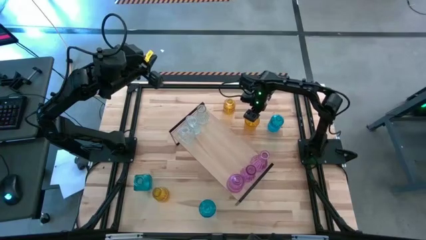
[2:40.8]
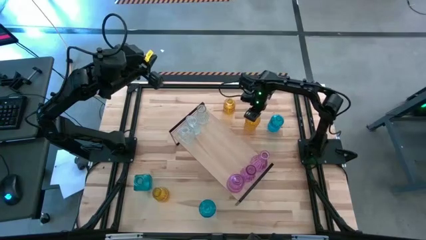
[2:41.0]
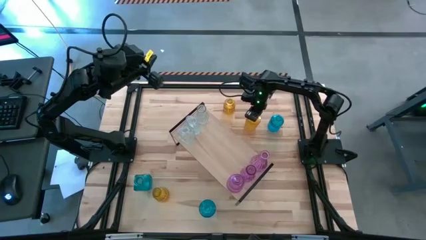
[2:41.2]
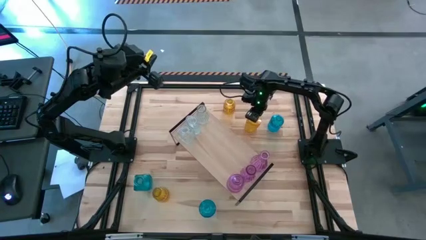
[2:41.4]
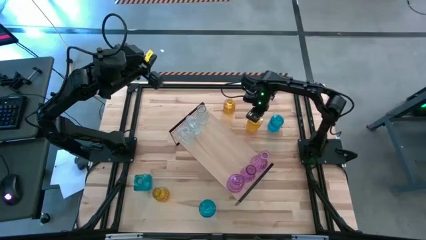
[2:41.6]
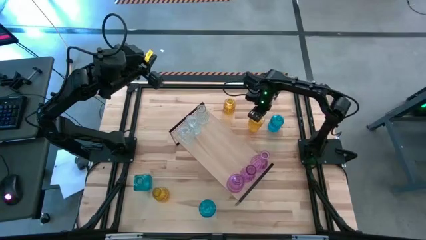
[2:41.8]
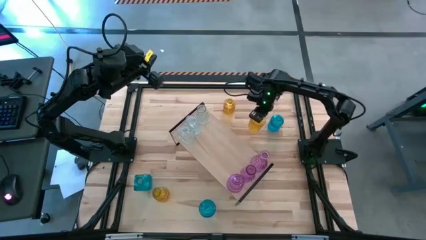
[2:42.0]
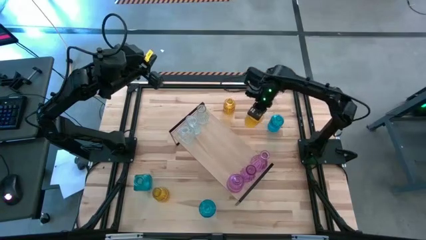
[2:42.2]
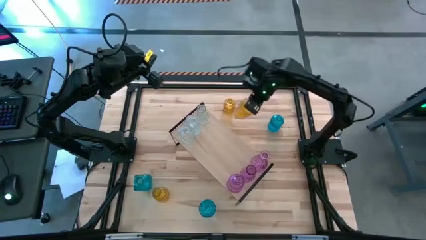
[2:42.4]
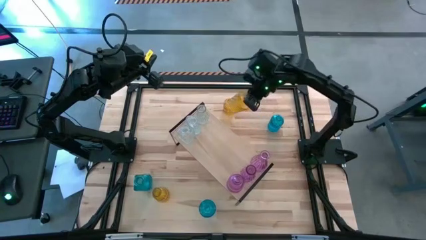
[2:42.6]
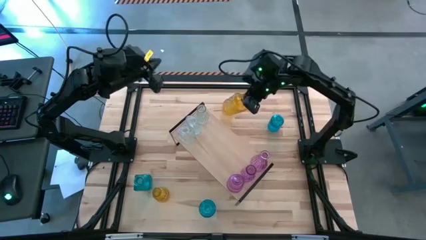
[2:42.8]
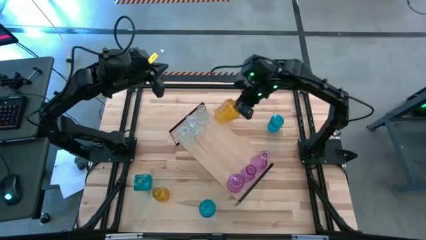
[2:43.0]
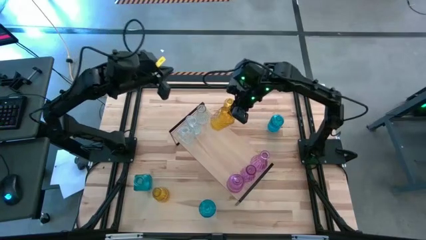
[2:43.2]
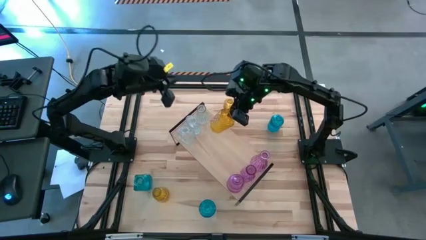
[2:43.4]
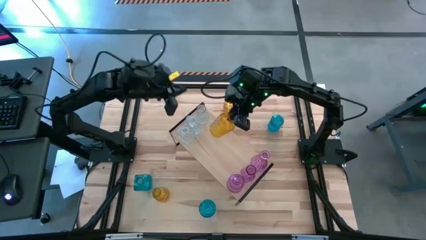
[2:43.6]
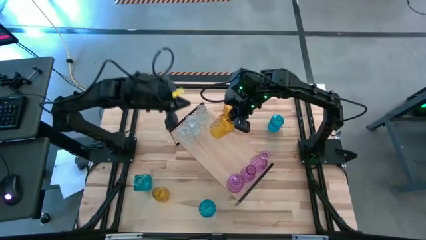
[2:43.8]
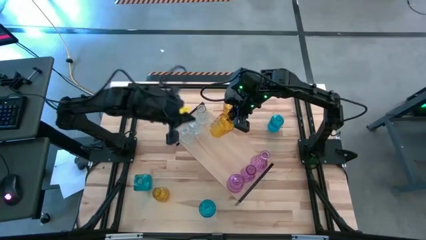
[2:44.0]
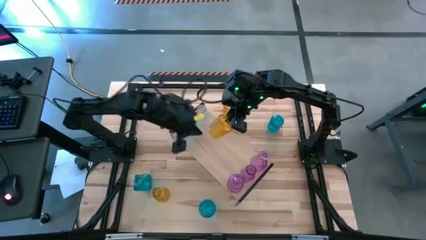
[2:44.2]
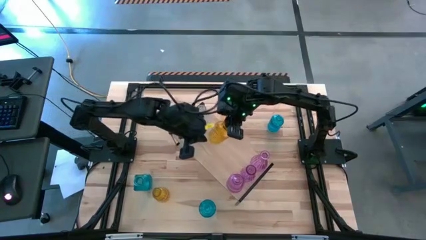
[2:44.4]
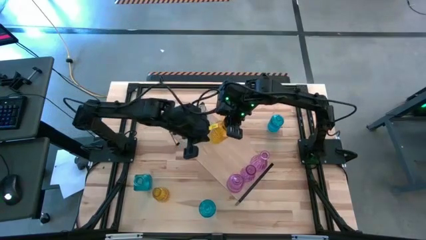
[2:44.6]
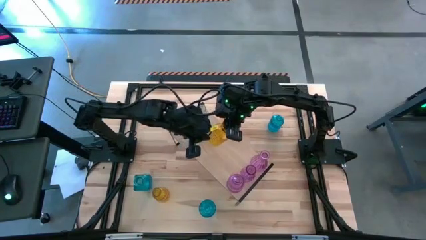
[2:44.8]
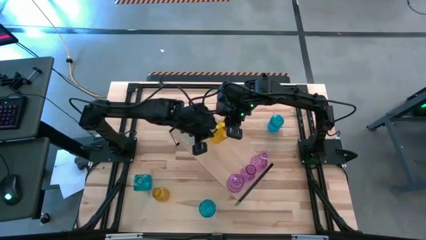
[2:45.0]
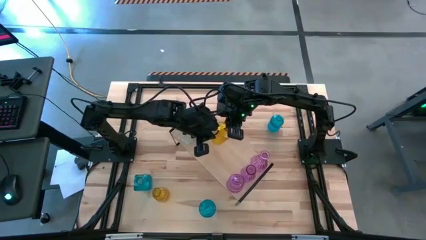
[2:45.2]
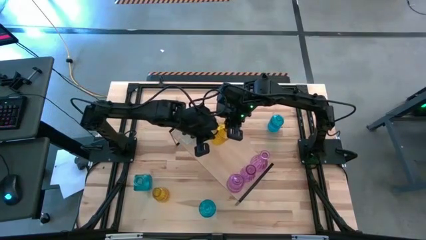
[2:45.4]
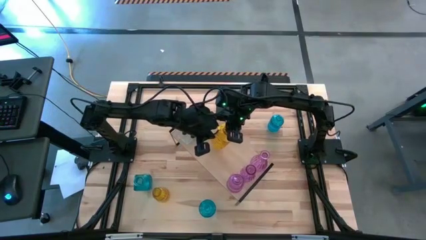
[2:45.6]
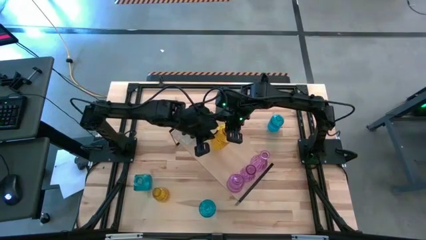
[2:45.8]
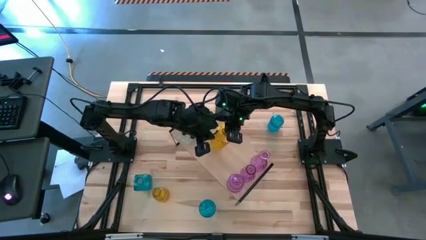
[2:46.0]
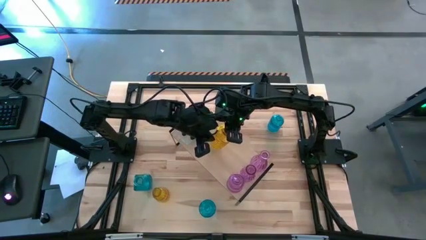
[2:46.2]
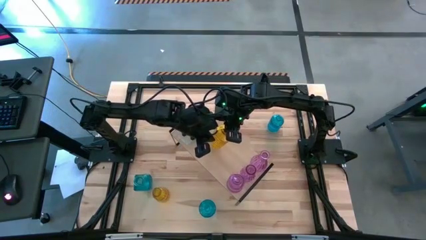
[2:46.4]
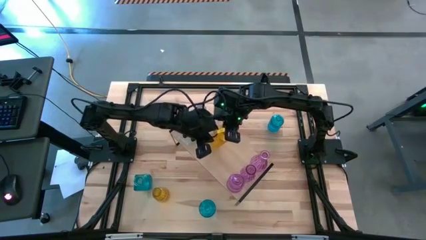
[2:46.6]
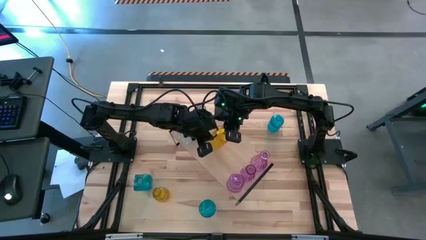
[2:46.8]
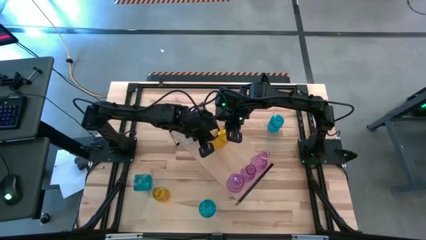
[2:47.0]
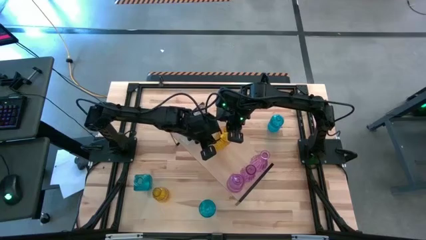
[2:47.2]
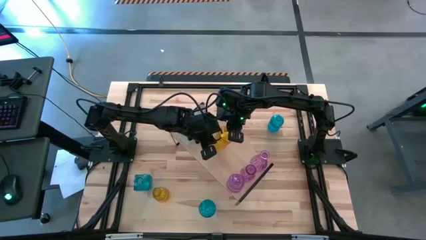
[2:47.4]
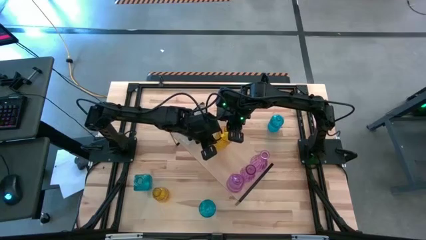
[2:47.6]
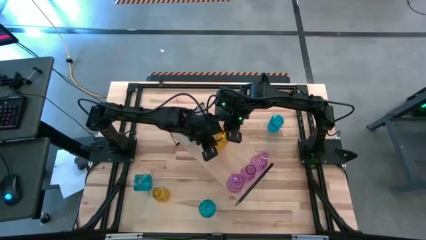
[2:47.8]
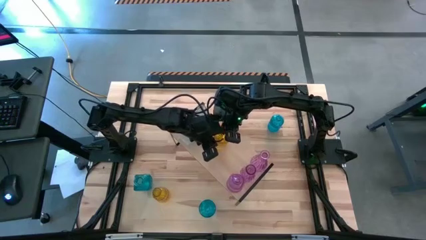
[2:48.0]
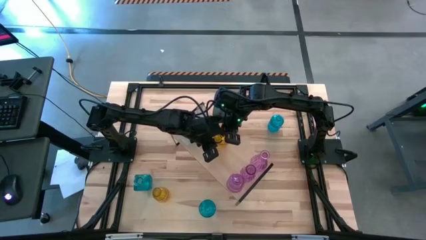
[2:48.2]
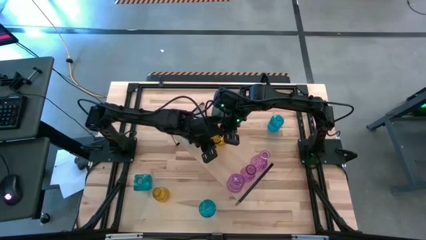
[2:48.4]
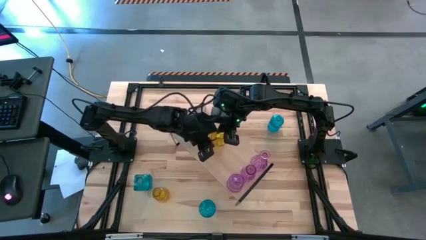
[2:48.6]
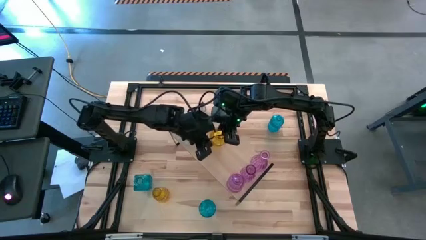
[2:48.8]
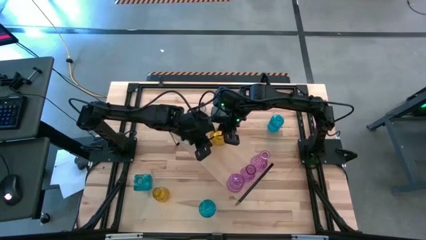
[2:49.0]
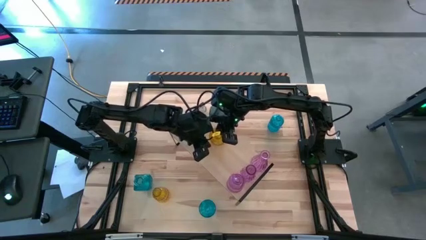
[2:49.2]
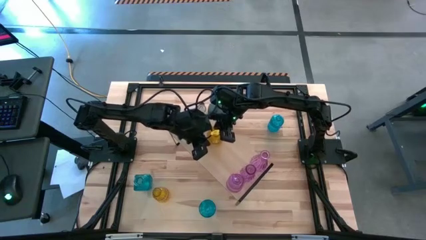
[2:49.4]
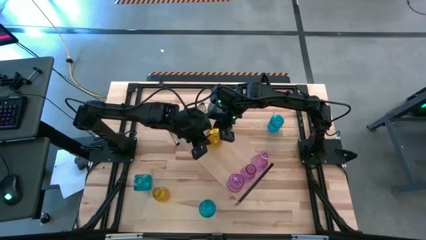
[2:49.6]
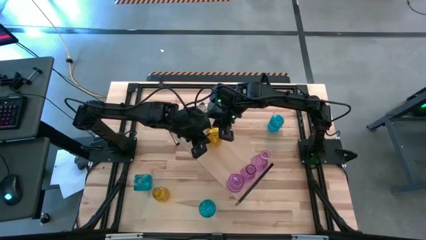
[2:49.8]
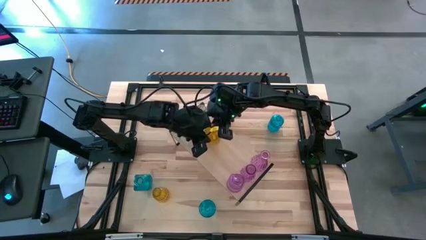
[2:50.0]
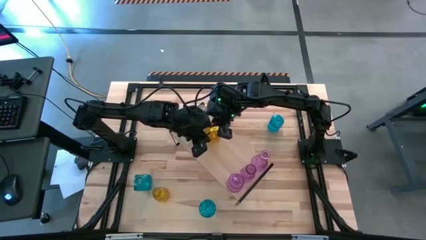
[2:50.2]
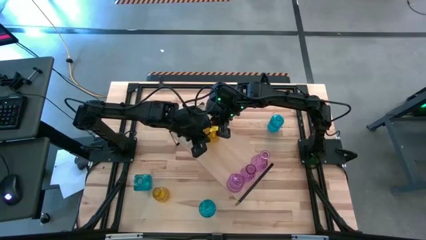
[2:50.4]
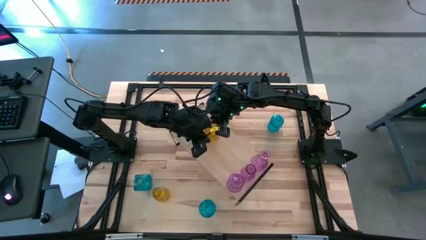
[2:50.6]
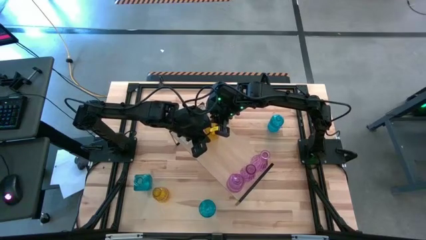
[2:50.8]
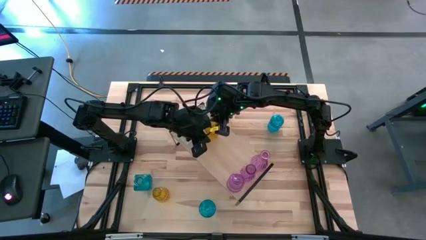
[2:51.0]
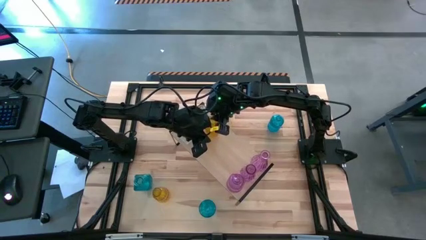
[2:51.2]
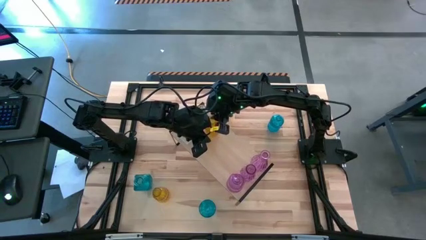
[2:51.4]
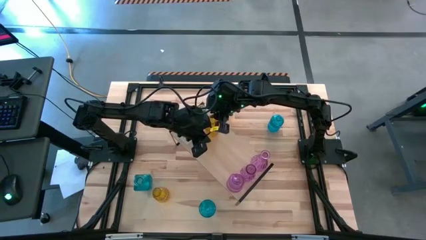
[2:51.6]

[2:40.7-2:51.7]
Task: sort vases onto shelf
Put the top right yellow flower vase on the shelf

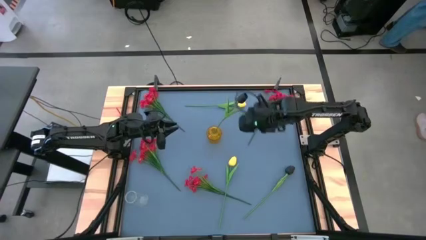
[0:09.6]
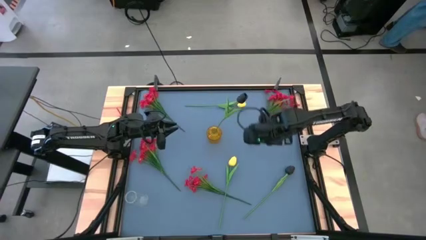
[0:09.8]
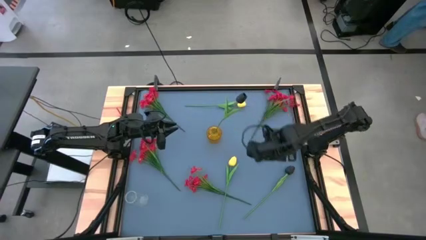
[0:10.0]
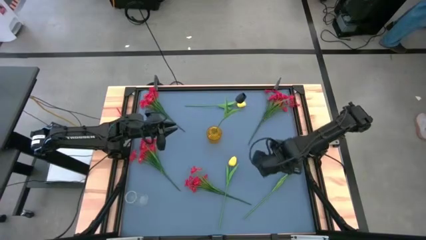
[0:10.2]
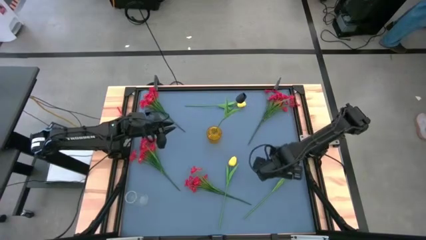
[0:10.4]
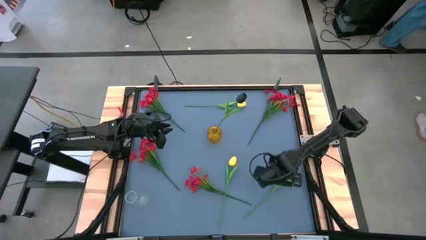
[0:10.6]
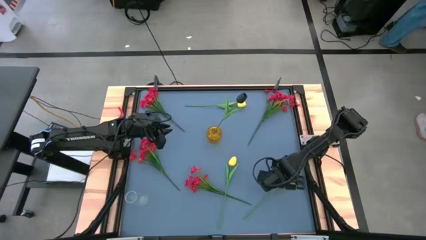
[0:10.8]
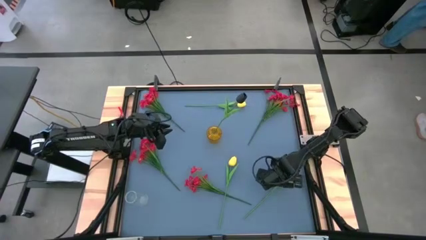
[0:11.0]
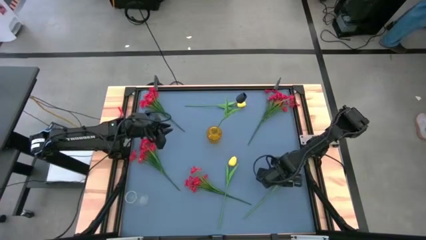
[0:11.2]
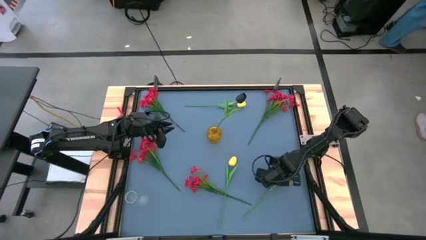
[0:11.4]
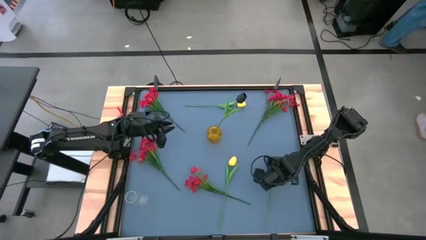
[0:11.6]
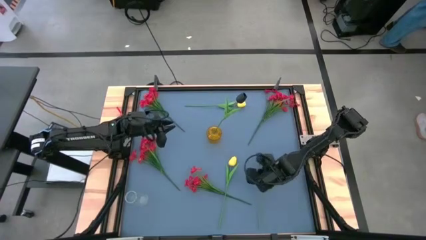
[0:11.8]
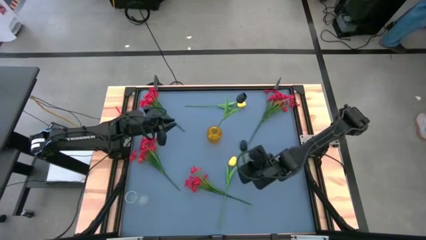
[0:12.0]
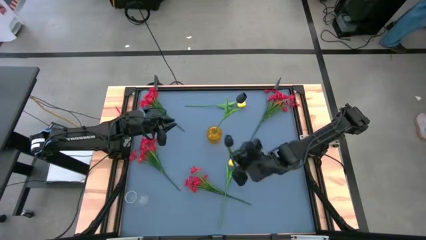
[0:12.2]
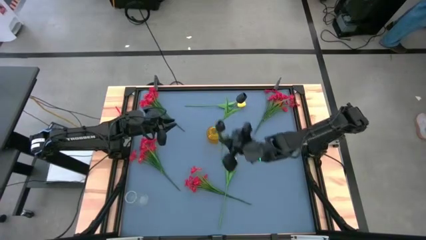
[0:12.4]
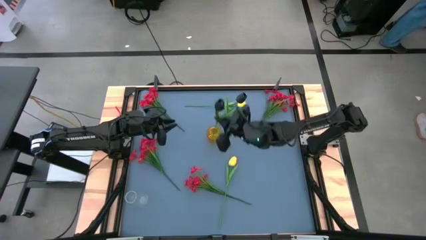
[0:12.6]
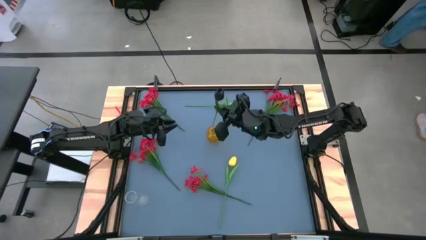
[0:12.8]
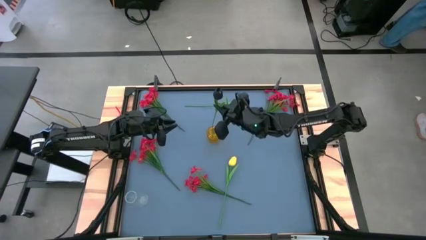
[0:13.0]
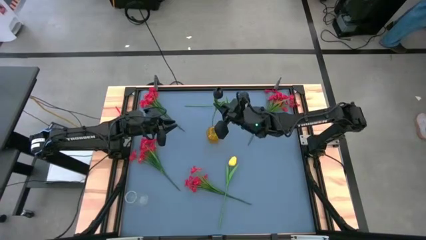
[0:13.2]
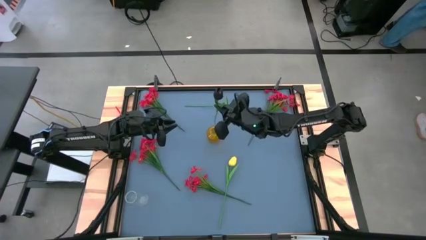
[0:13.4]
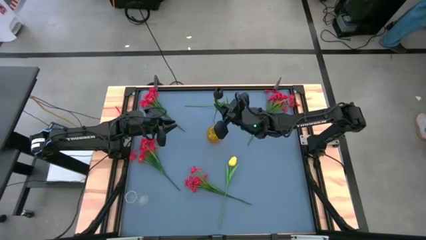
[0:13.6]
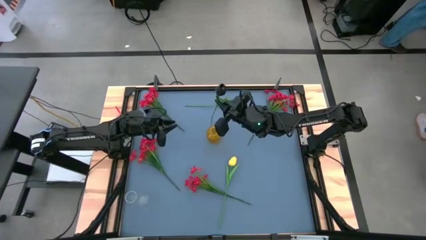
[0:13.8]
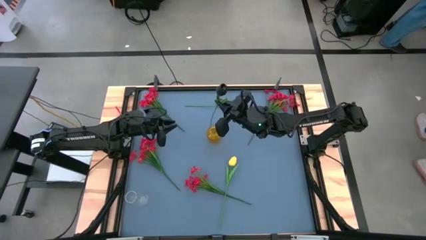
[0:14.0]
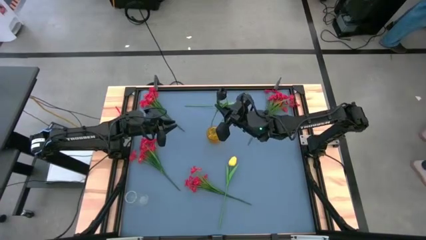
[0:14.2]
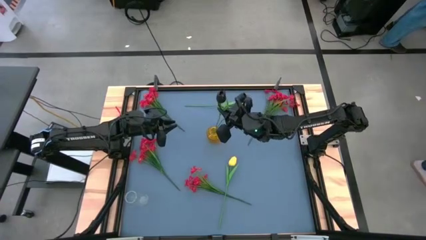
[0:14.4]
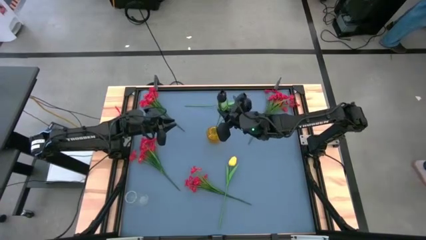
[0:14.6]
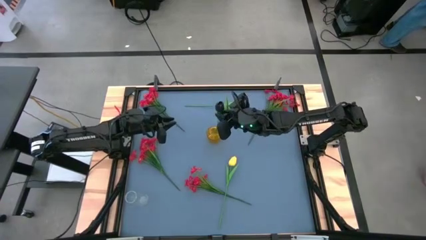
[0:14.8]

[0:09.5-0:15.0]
Task: Sort flowers into vase by color
Put the black tulip into the yellow vase
